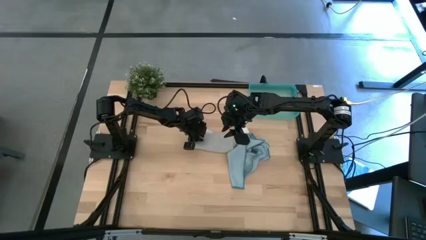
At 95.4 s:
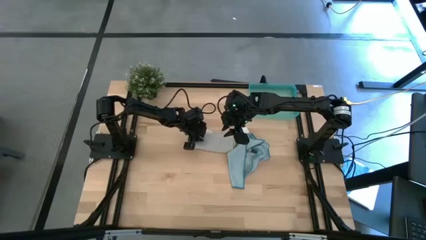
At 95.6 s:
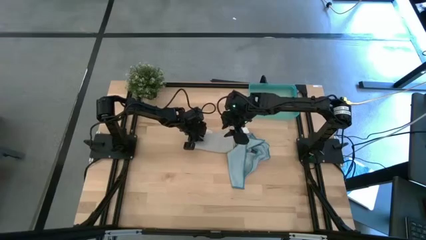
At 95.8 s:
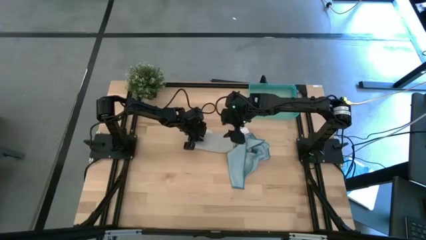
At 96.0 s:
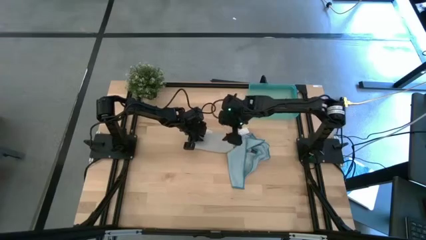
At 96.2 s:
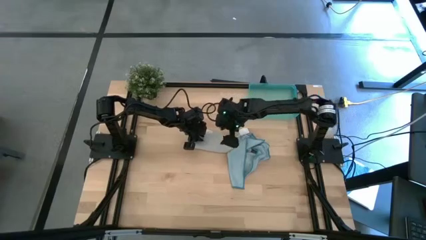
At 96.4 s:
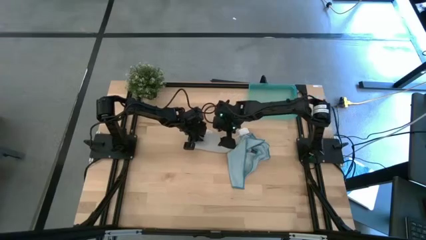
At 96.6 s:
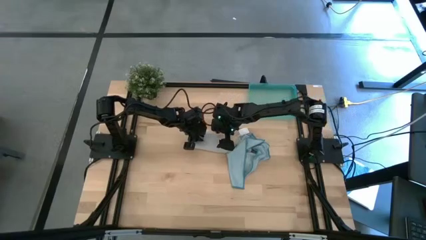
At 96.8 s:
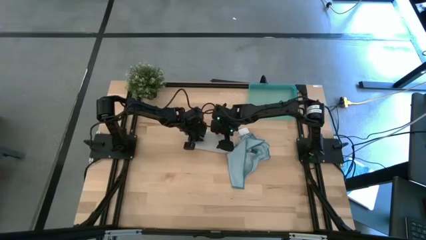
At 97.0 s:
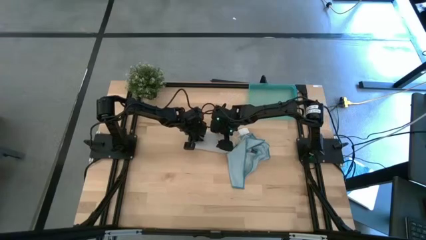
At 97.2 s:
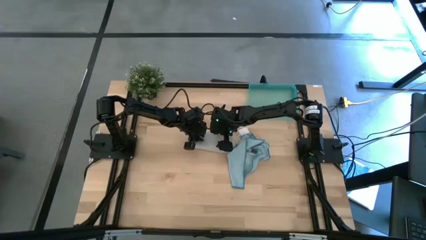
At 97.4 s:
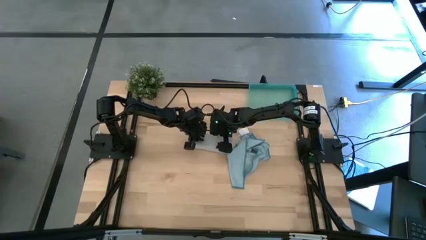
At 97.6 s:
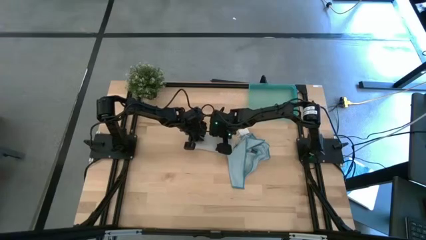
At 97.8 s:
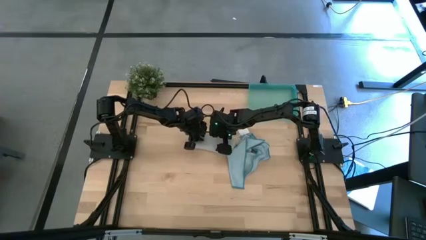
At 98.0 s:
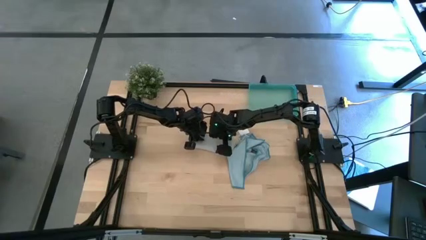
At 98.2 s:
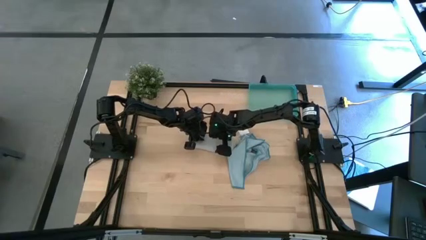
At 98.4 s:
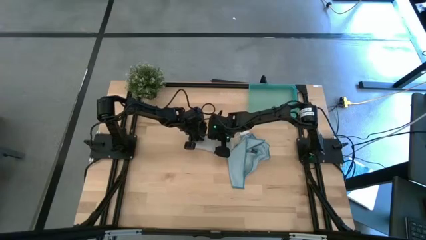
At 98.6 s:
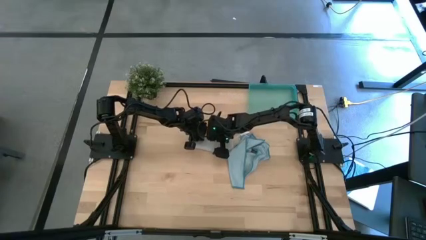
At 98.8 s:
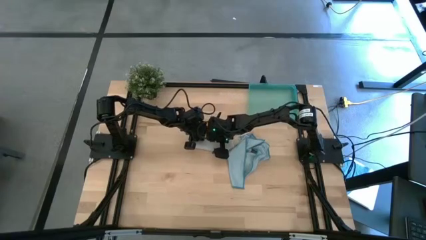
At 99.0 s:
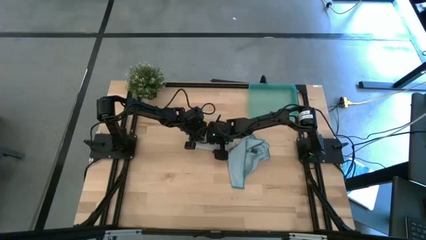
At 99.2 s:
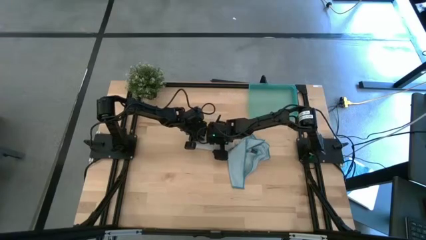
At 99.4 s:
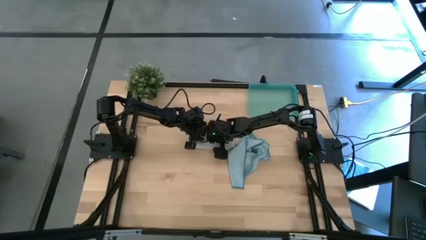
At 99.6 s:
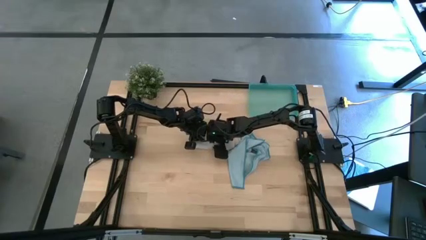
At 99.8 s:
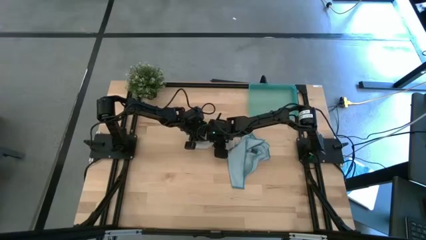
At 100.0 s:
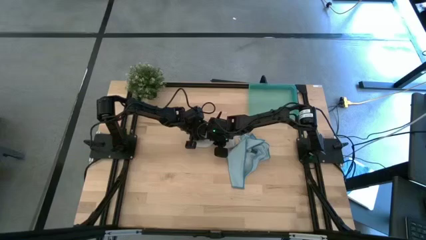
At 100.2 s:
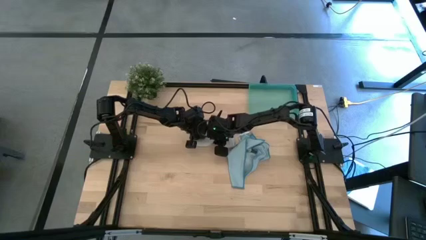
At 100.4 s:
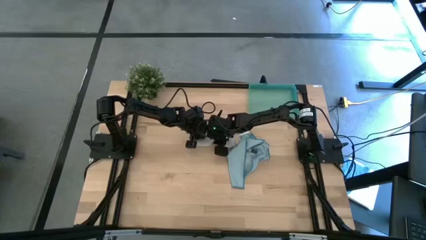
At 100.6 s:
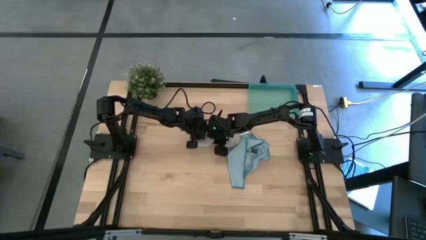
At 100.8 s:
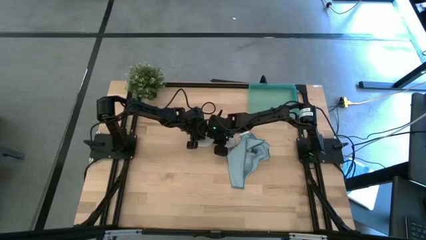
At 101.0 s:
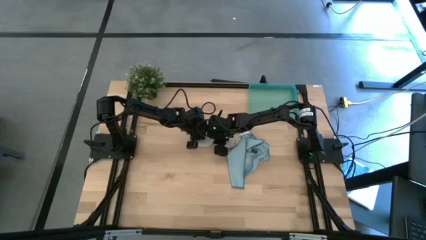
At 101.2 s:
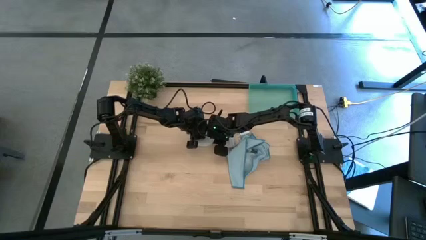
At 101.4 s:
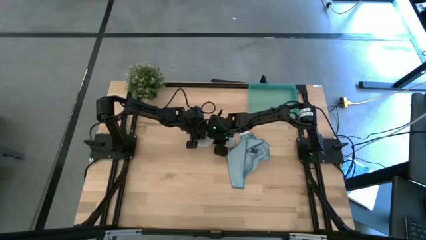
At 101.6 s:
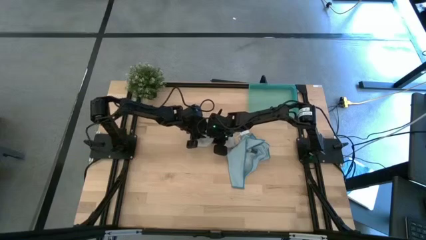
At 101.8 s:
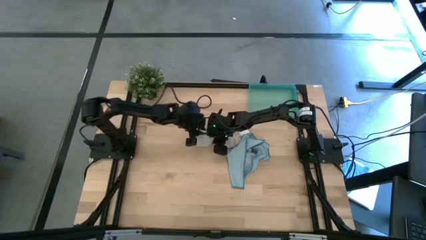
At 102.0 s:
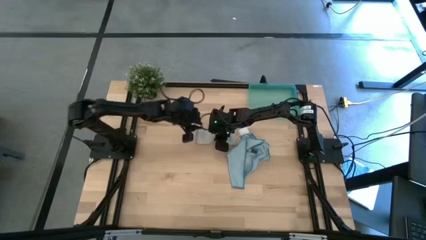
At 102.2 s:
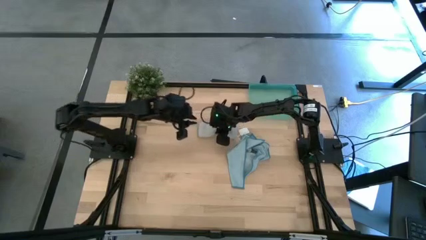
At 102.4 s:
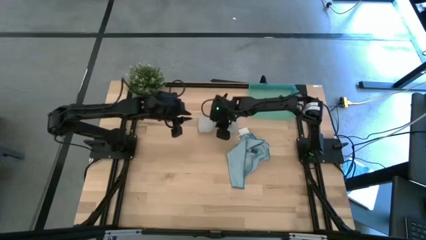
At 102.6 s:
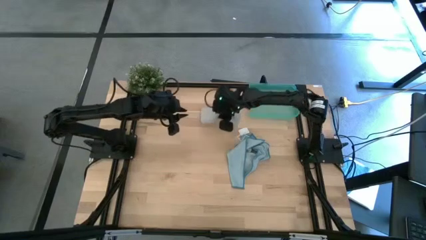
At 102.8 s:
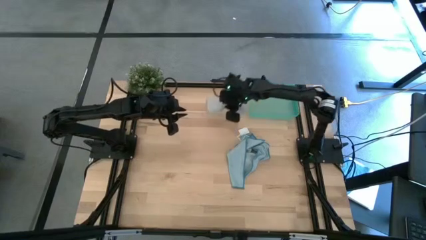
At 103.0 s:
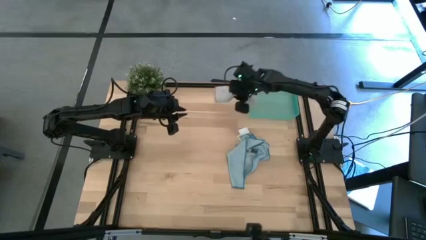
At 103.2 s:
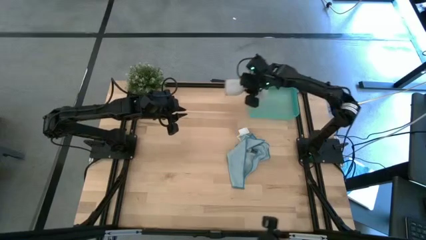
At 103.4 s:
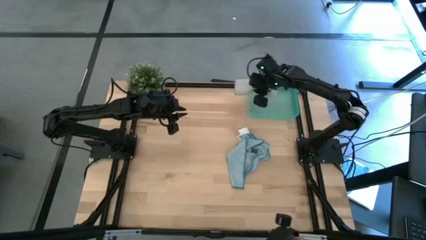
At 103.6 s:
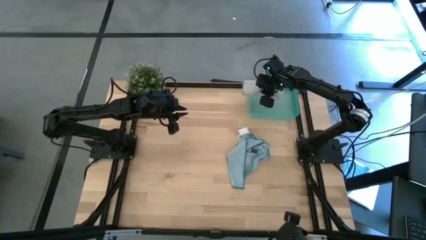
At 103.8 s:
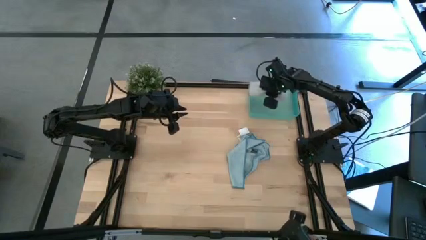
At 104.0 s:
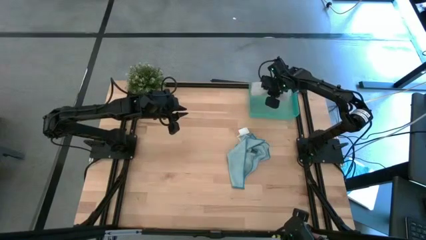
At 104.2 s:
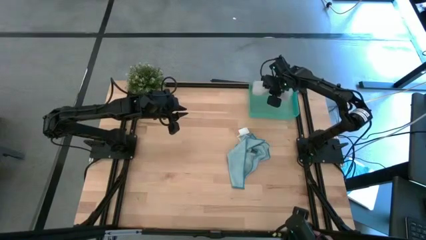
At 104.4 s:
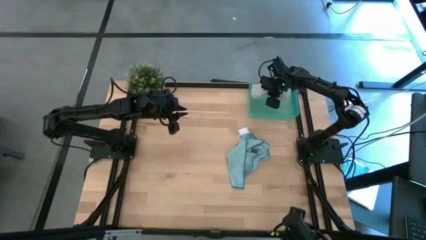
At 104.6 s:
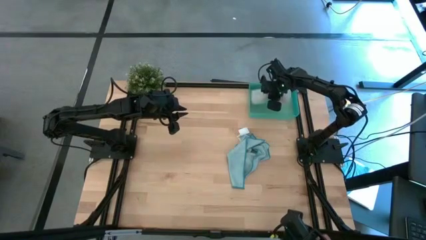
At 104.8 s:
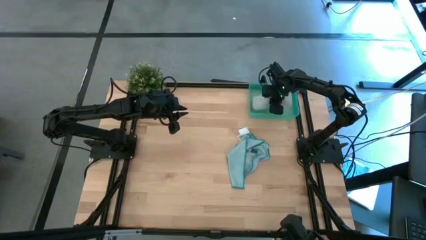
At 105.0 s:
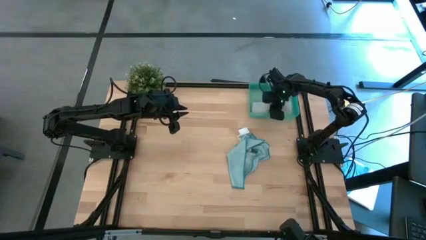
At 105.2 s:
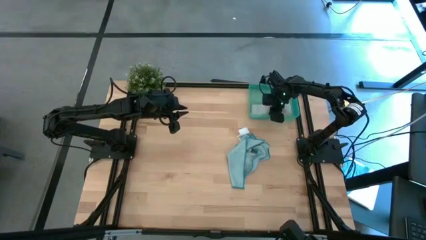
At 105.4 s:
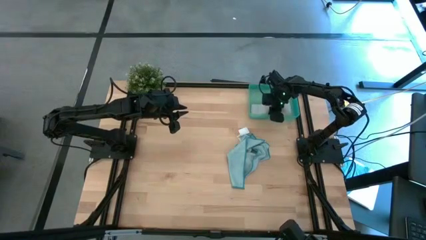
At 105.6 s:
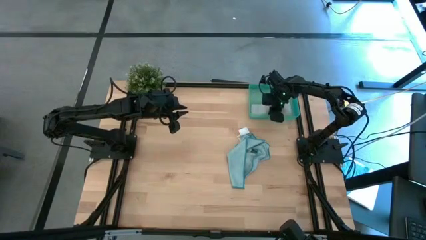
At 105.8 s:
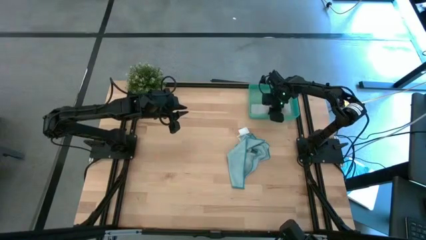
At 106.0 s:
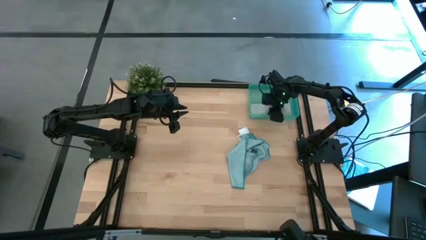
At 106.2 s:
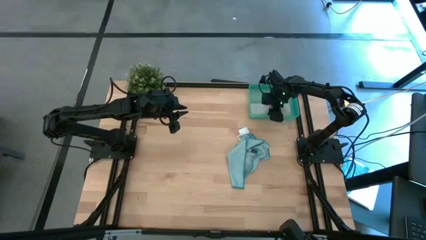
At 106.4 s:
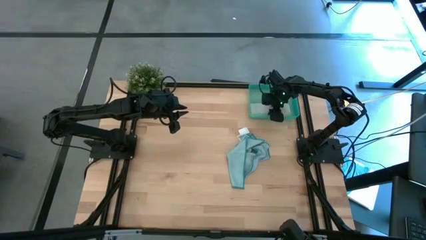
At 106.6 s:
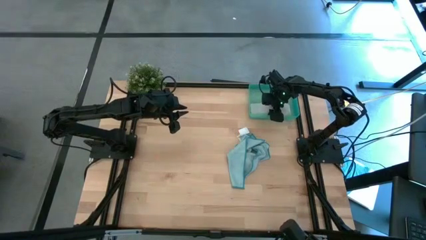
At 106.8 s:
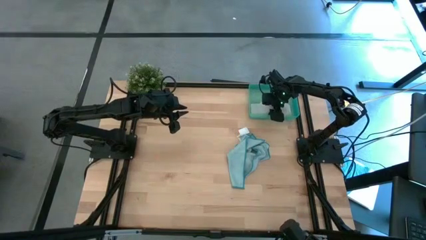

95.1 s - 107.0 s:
Task: Roll microfiber towels into tight, uniform cylinder then place into a basket
Put the grey microfiber towel into the green bin

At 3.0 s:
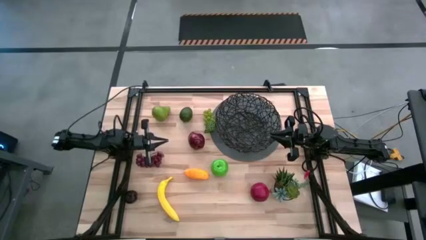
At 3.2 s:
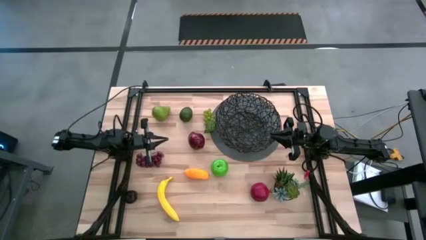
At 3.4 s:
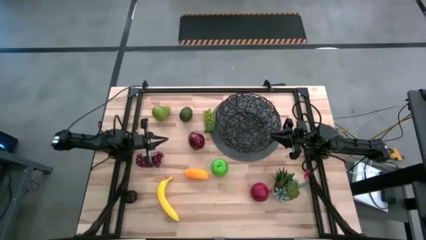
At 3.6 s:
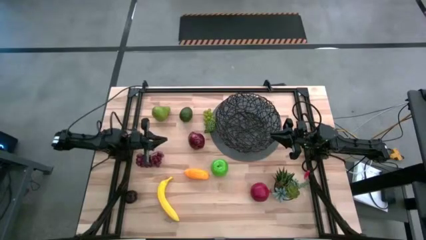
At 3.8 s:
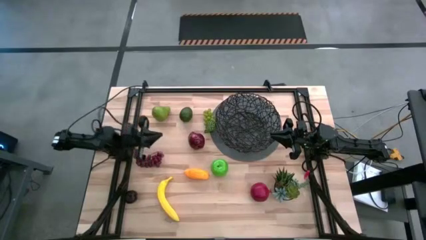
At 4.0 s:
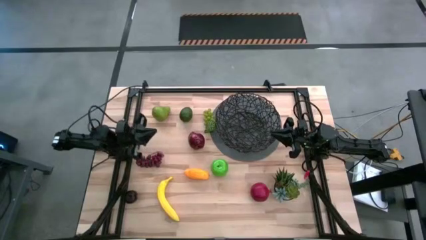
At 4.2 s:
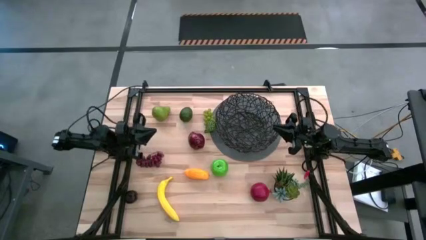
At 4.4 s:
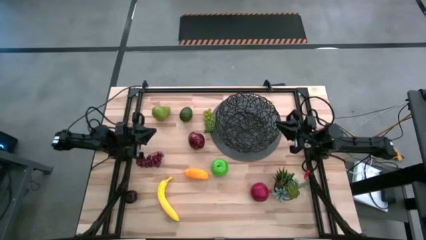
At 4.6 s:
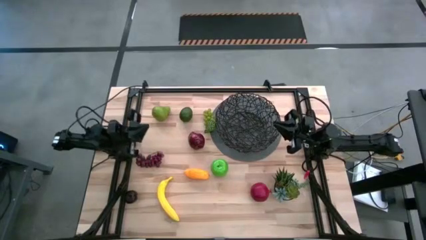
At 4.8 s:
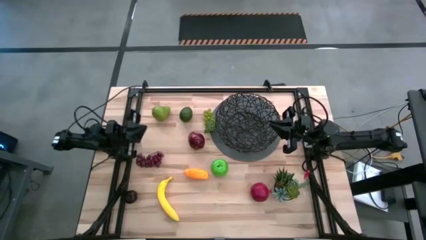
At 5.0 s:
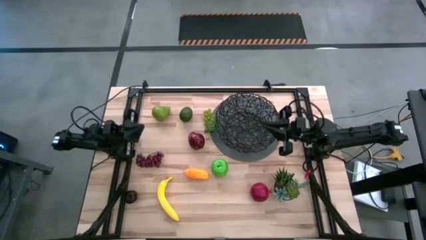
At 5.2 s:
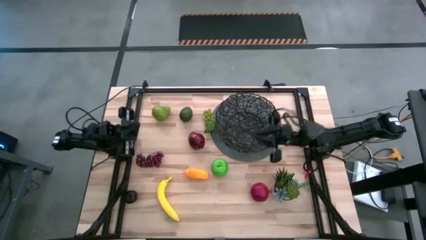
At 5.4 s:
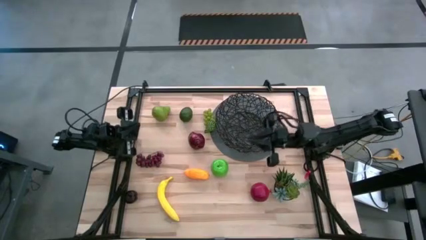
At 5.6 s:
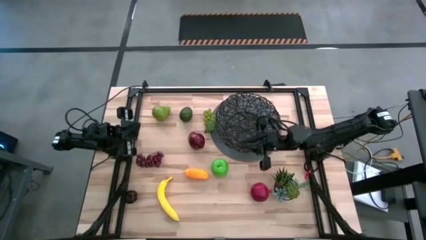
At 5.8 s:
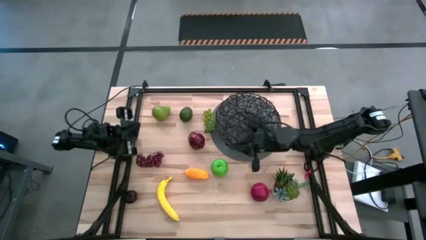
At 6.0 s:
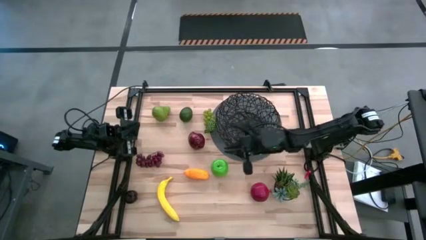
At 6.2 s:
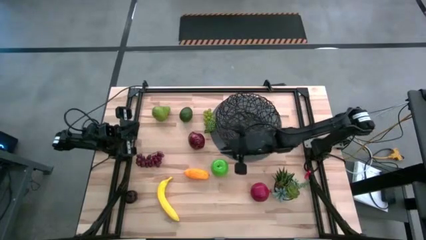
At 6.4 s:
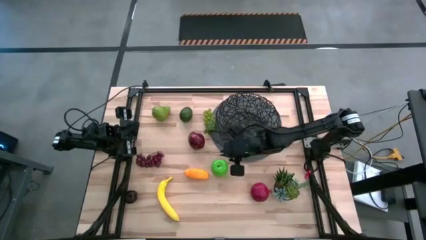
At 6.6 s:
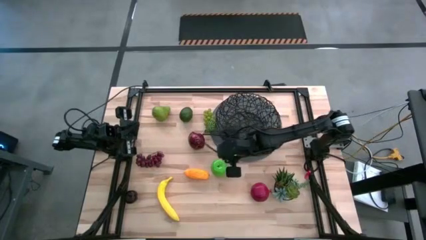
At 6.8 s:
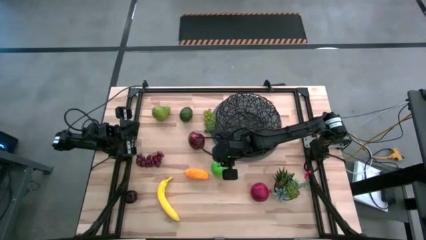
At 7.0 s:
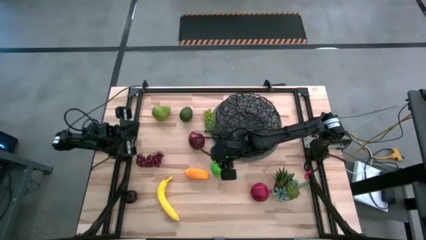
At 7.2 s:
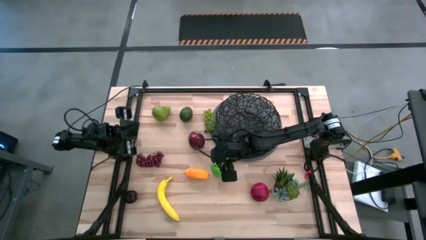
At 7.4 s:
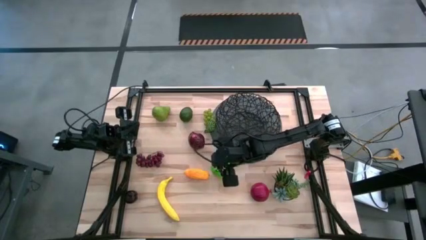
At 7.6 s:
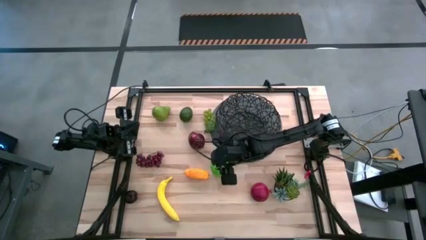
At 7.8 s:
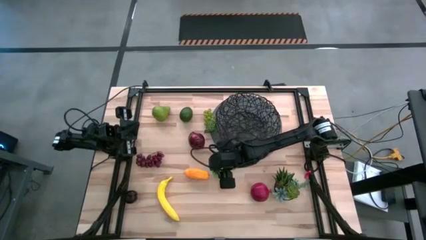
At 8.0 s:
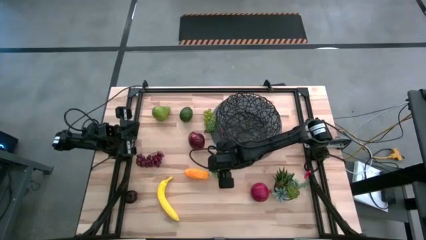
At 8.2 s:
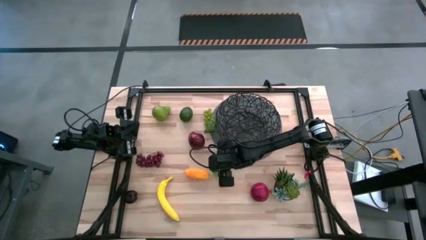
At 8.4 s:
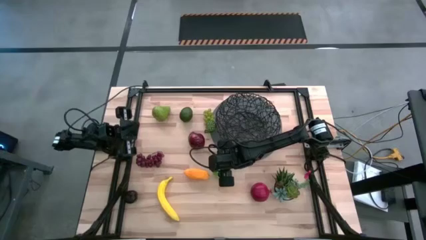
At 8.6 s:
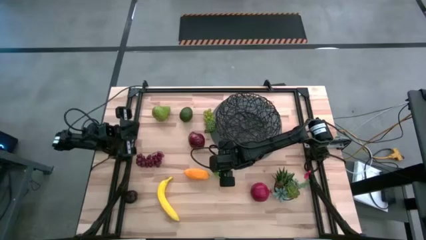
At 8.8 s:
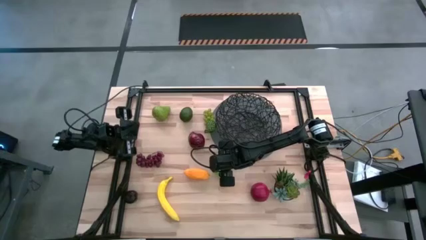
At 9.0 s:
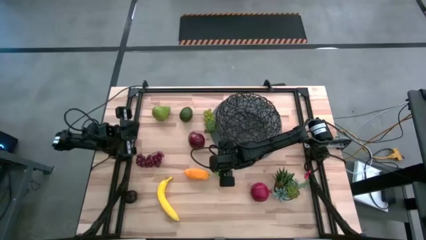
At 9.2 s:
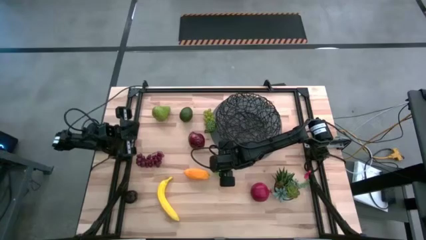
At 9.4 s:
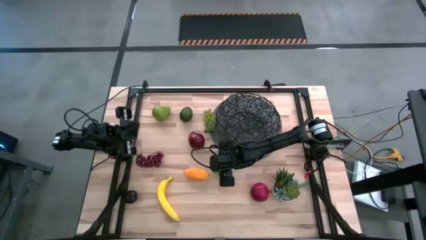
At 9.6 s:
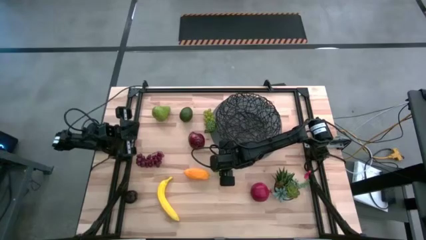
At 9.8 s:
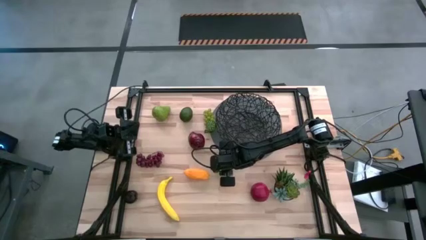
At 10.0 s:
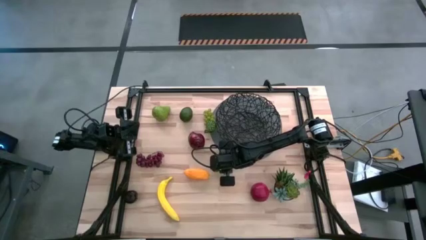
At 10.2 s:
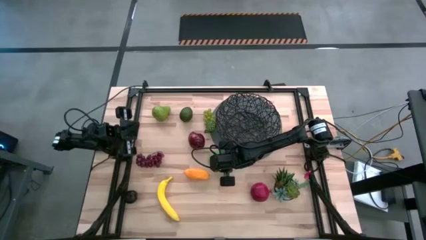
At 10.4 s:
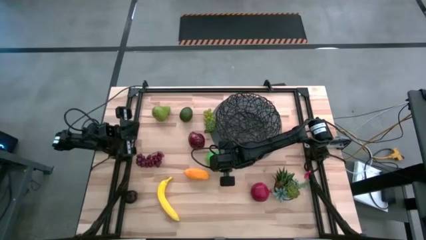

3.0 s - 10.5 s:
Task: Build produce basket
Put the green apple into the wire basket
